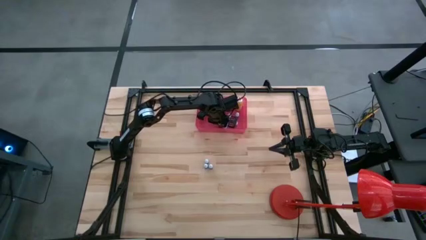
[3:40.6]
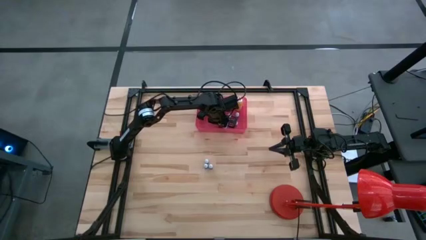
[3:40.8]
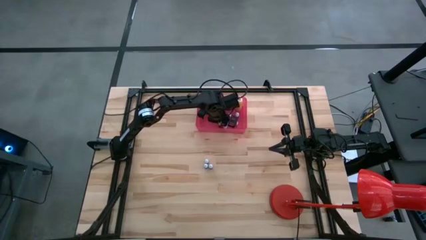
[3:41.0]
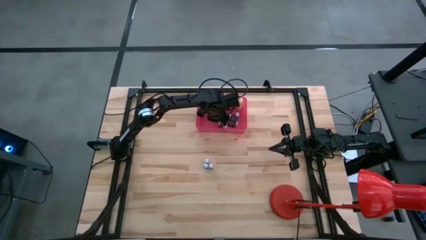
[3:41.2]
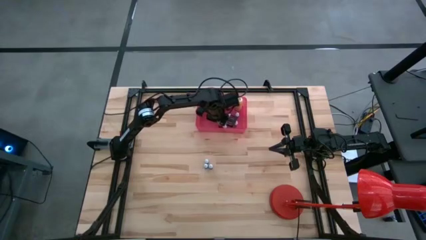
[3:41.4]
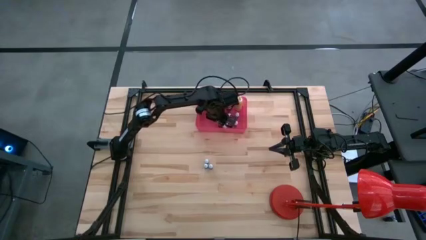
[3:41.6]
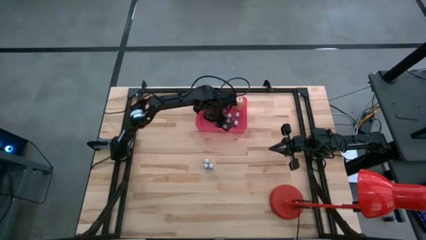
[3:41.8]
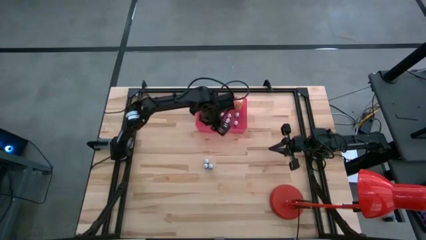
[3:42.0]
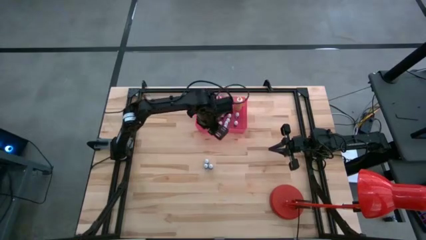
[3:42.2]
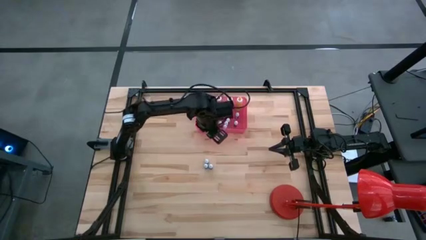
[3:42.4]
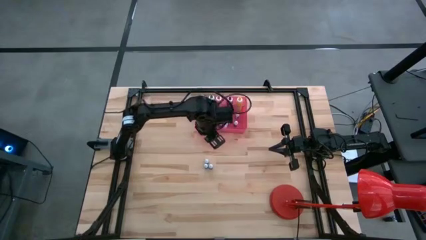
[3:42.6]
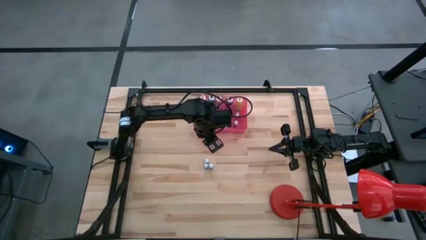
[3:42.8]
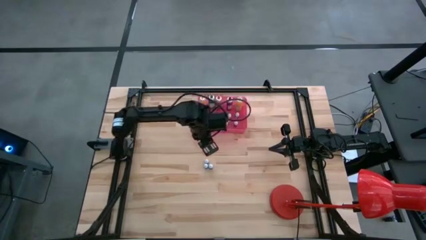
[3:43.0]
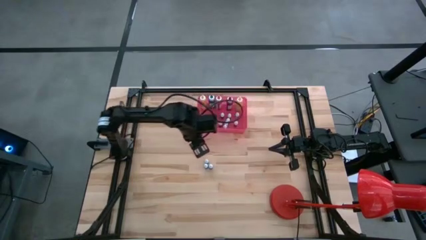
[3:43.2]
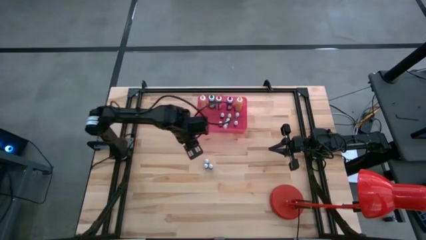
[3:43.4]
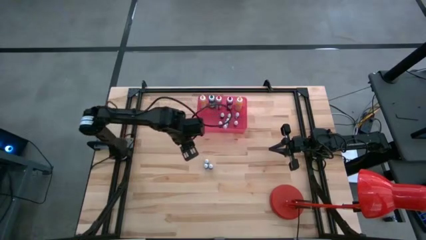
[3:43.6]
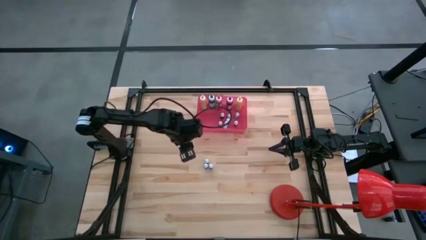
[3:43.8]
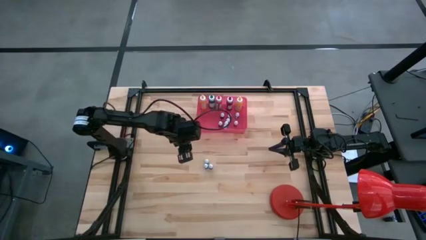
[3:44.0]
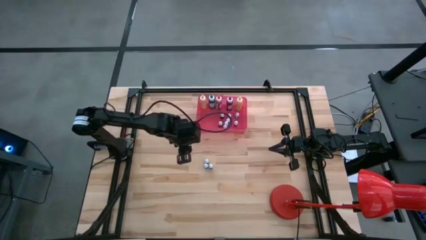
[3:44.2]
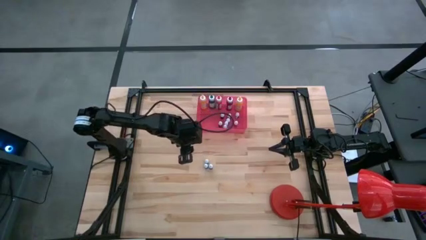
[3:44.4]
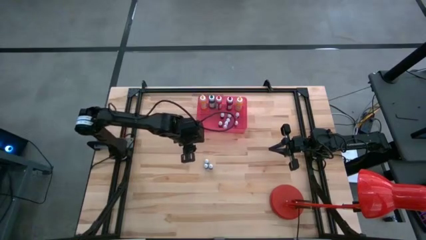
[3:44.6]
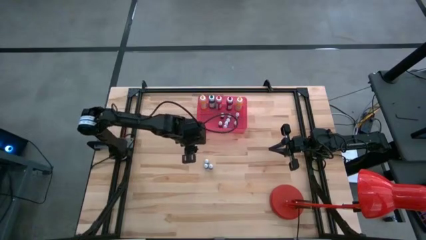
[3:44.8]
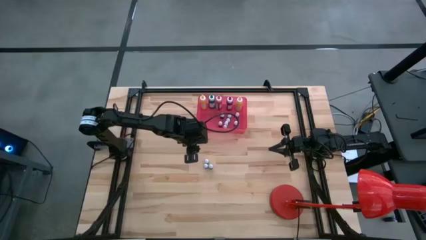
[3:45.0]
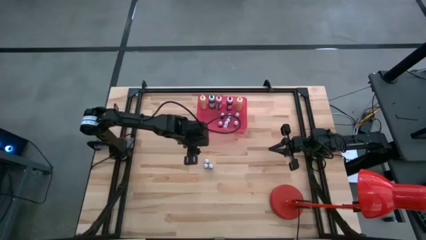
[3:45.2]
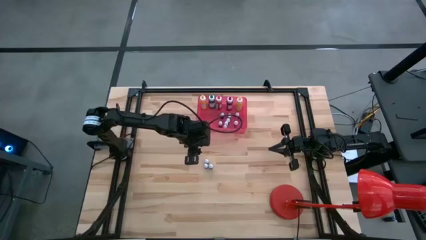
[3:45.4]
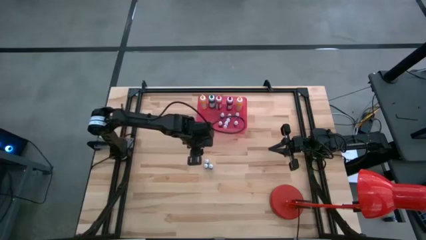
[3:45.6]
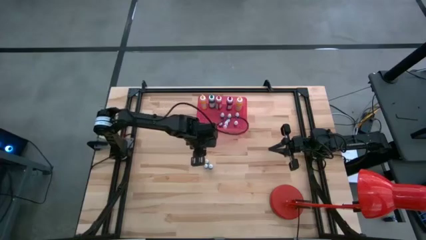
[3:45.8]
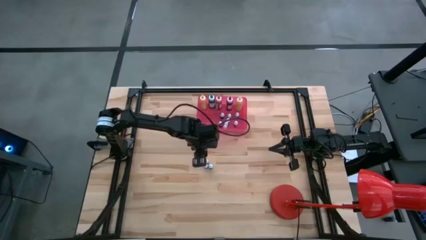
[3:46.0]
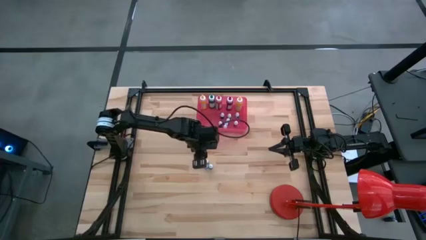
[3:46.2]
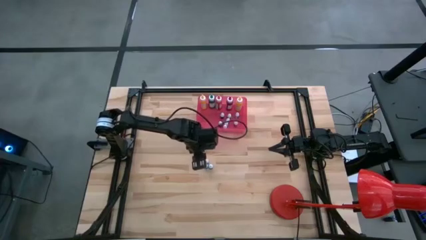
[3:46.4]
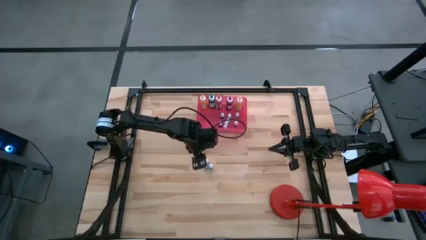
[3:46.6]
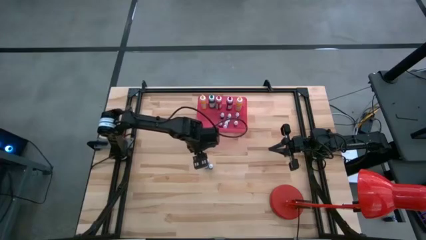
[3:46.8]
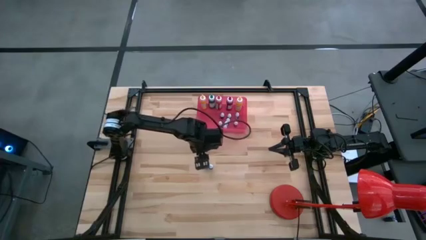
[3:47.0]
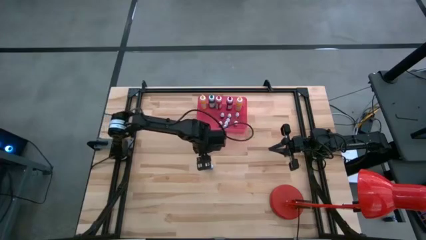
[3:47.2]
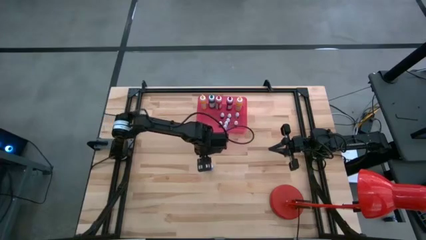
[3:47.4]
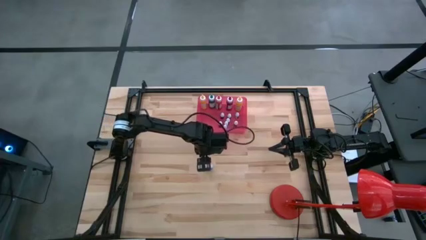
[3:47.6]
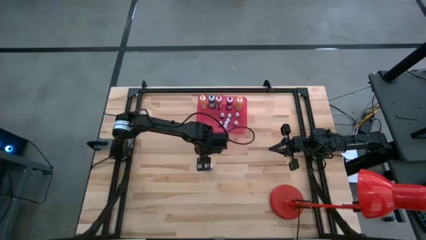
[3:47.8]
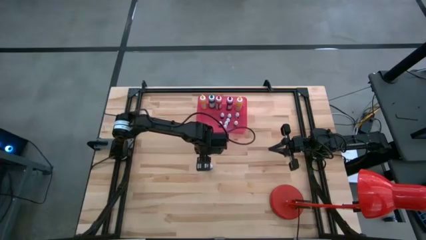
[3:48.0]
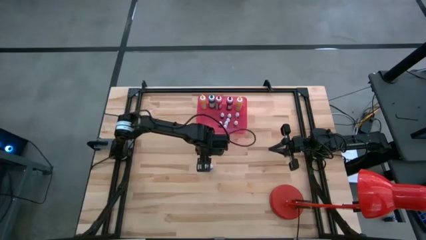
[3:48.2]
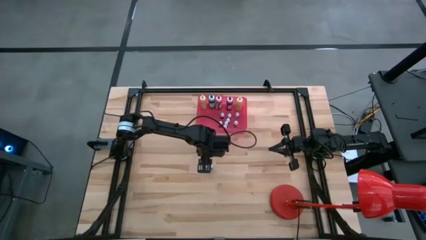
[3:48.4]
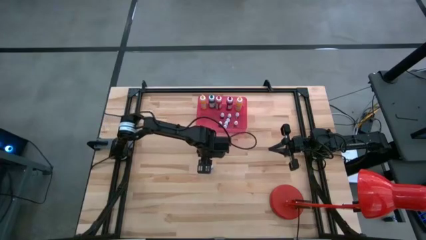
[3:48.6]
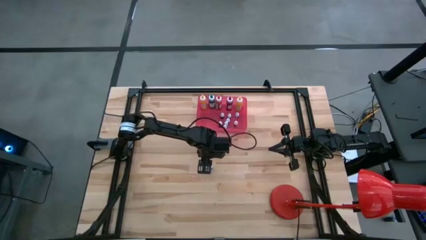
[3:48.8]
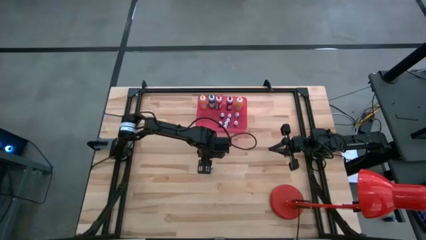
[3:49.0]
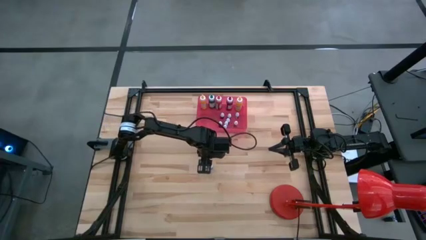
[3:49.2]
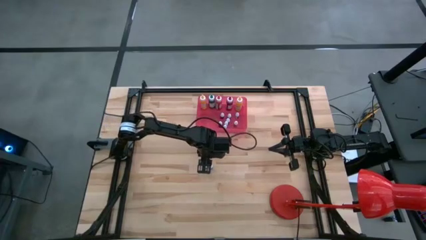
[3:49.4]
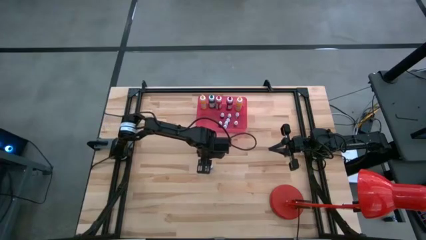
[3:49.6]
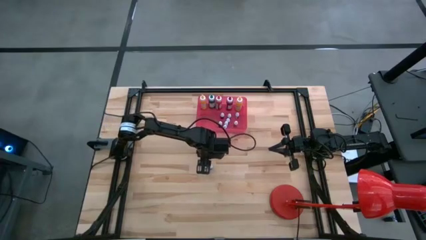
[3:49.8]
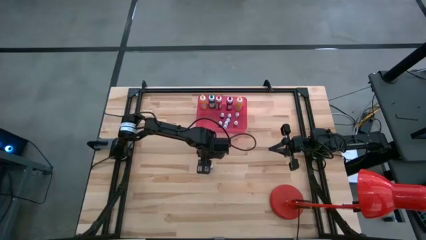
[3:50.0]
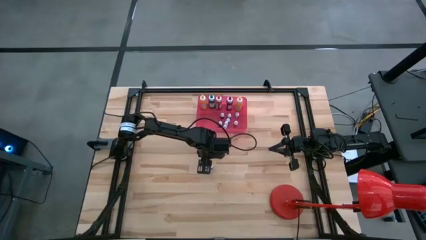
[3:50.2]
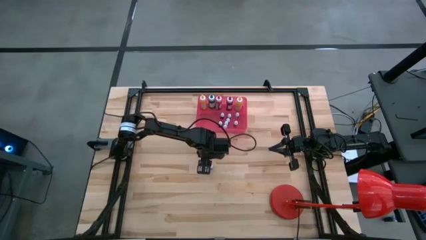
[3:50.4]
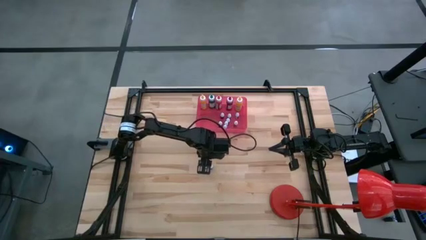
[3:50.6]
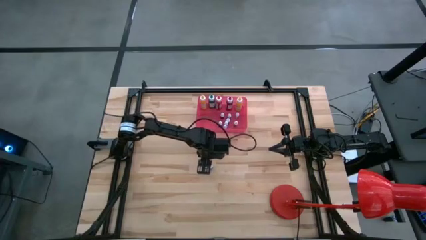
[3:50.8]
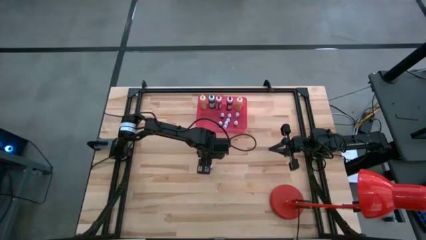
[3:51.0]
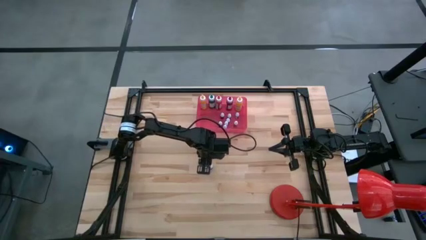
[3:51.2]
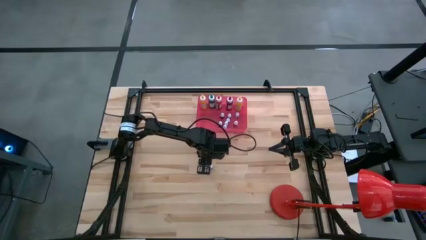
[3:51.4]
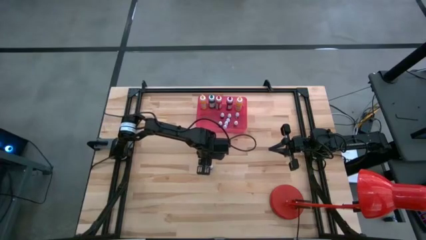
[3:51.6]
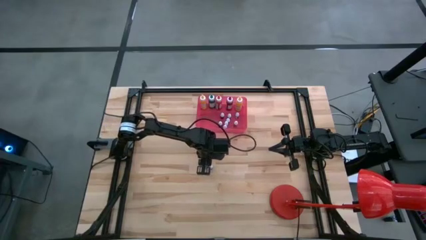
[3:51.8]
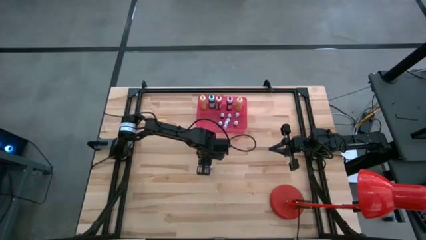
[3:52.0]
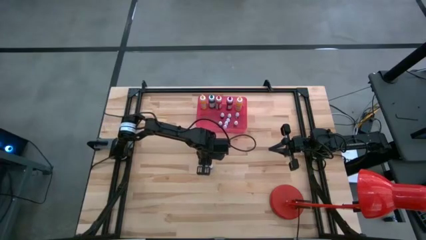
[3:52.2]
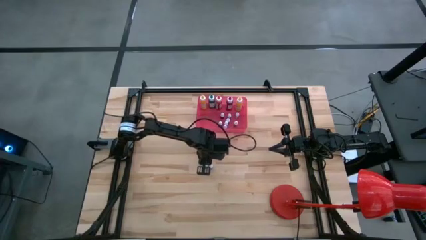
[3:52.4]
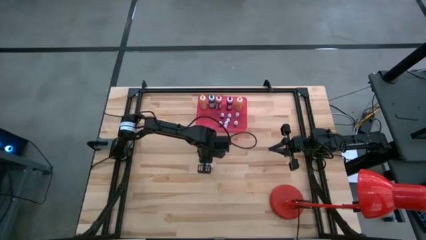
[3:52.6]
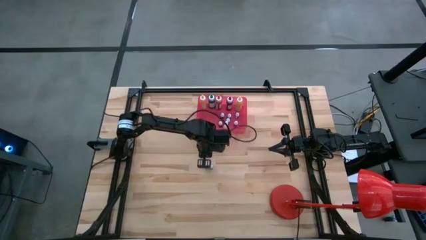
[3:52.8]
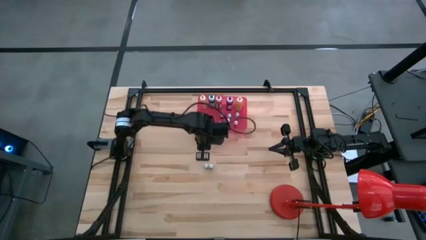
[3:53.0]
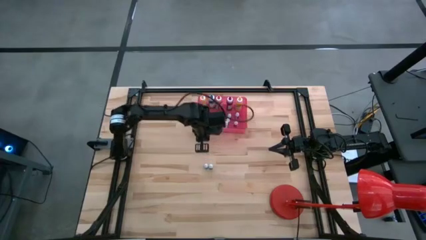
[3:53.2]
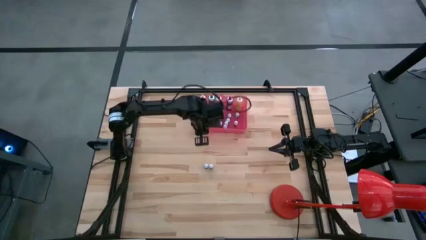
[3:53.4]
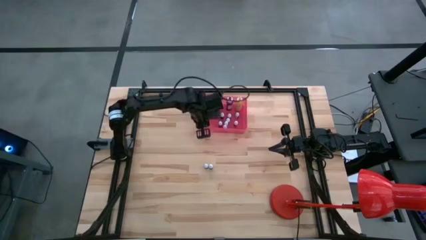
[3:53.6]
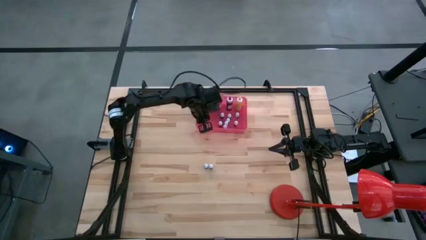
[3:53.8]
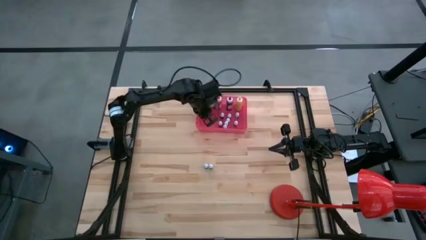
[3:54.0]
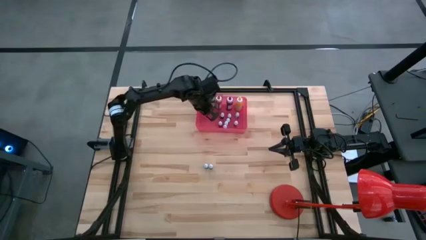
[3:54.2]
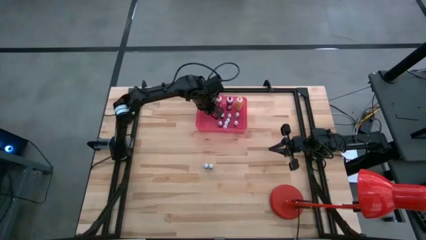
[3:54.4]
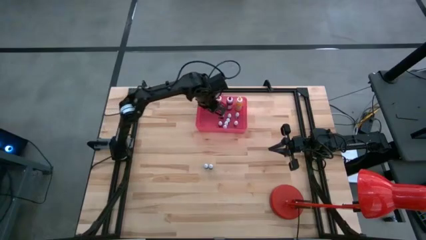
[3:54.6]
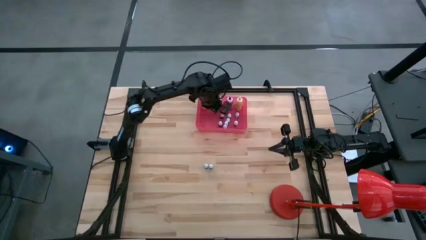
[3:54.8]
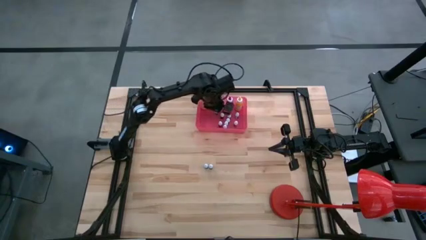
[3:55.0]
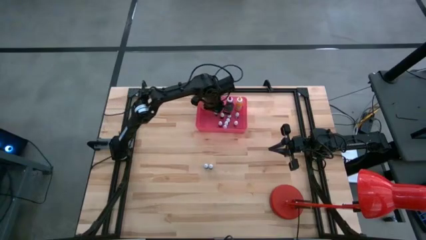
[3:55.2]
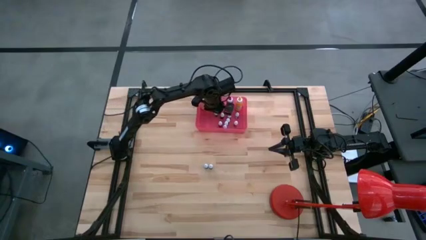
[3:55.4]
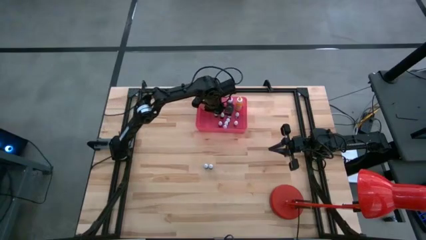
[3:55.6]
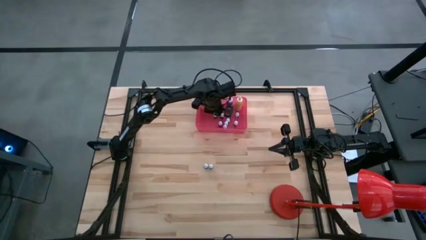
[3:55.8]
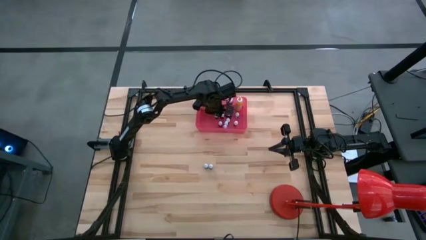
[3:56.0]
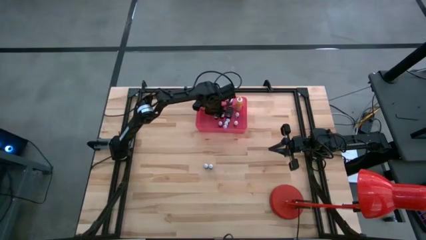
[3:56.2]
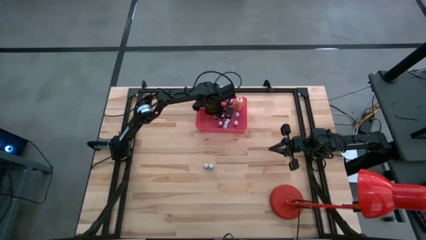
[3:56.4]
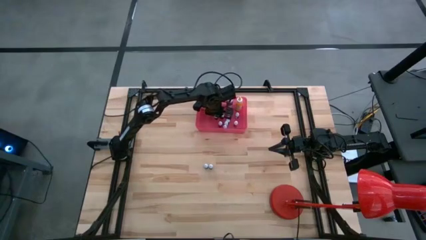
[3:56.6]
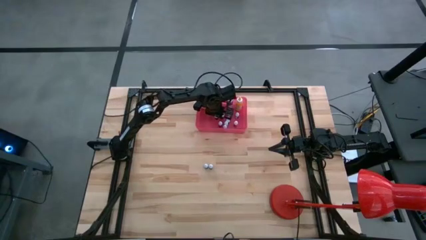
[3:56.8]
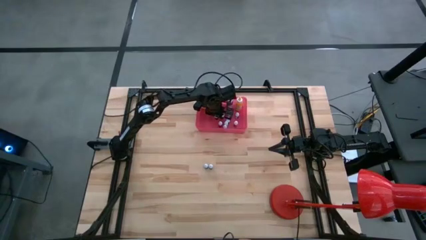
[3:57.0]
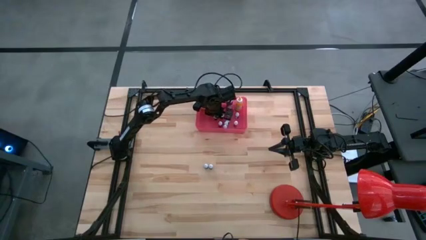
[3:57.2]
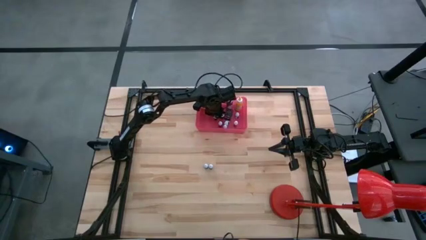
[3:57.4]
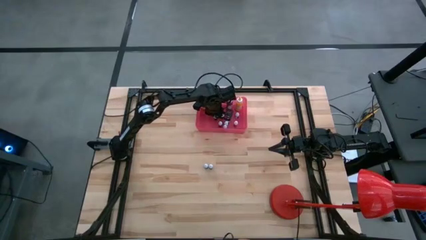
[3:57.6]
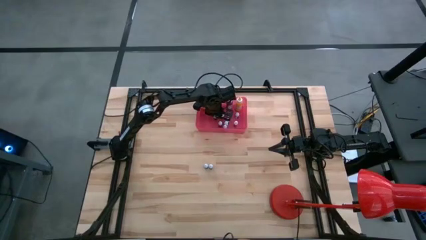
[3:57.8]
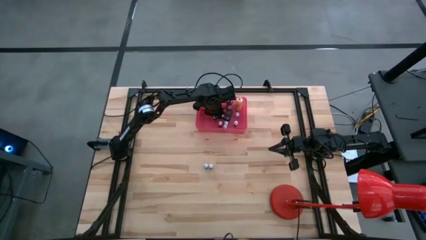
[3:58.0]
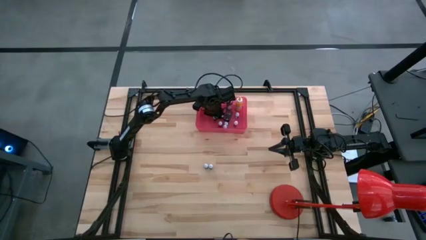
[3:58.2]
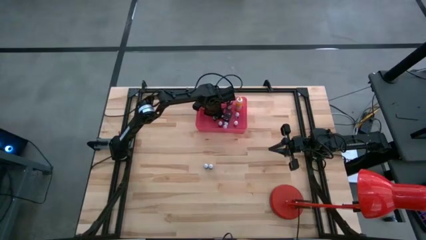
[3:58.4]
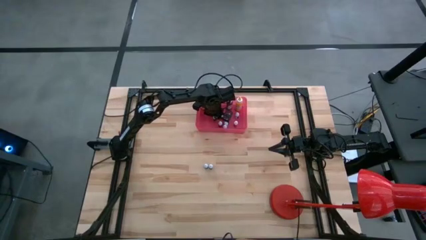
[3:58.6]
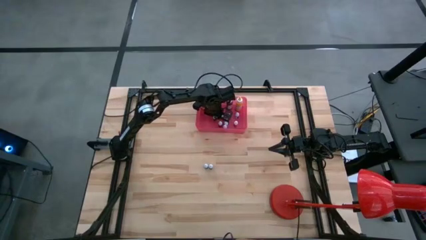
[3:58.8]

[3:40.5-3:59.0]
Task: Pick & Place food coloring
Put the small blue food coloring bottle into the pink bin
